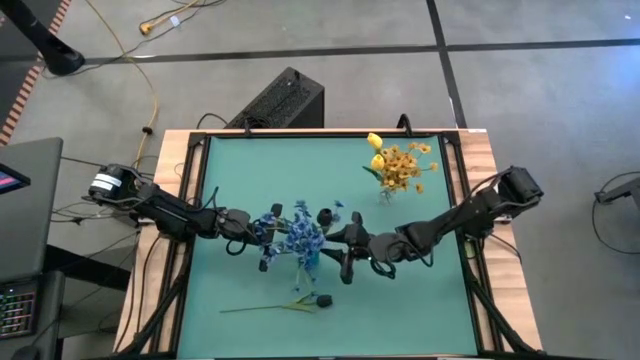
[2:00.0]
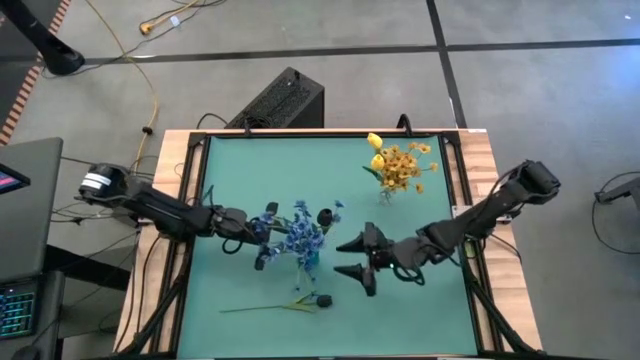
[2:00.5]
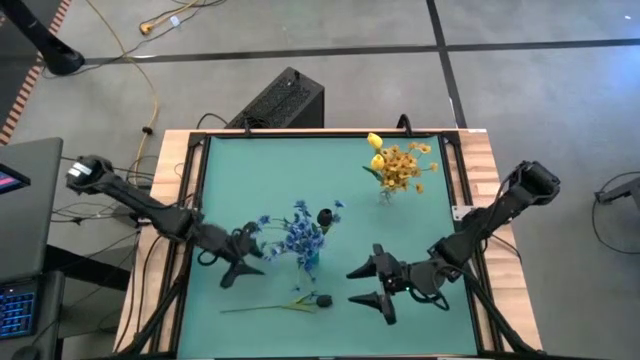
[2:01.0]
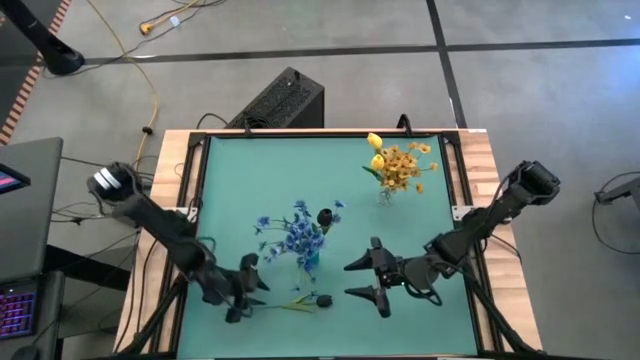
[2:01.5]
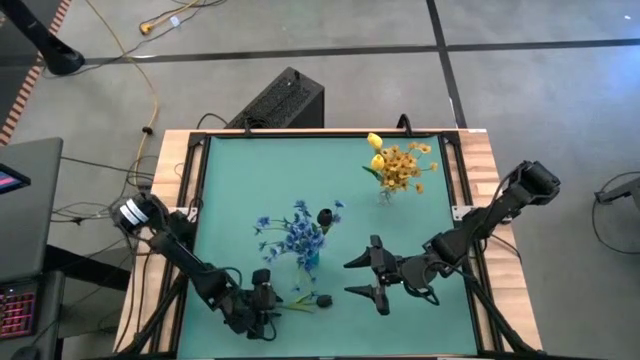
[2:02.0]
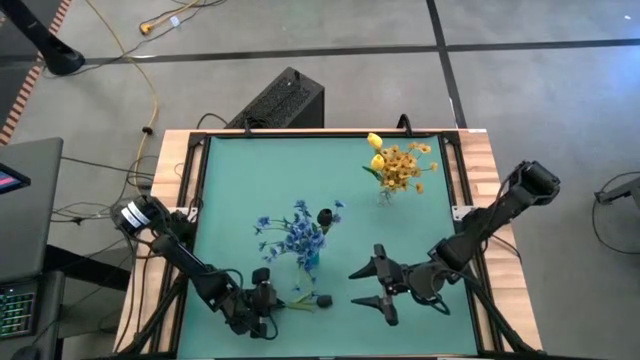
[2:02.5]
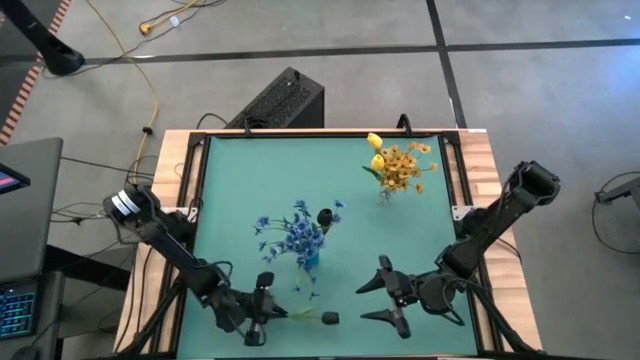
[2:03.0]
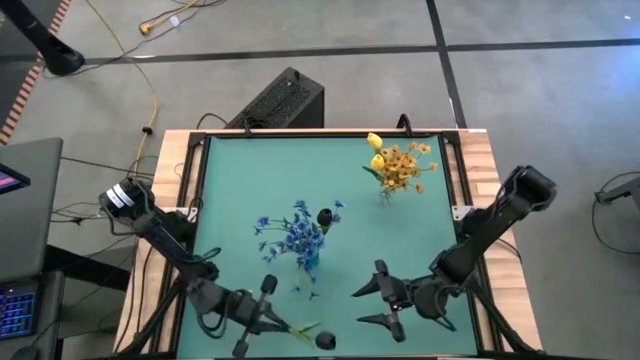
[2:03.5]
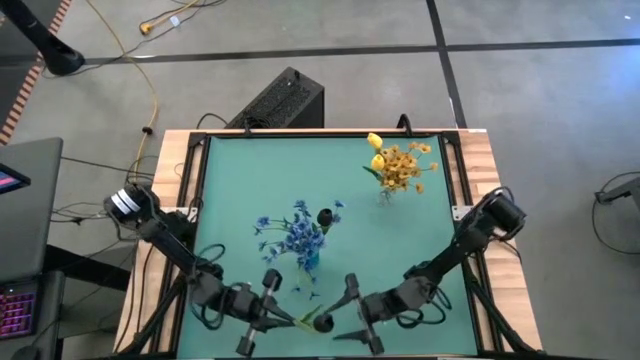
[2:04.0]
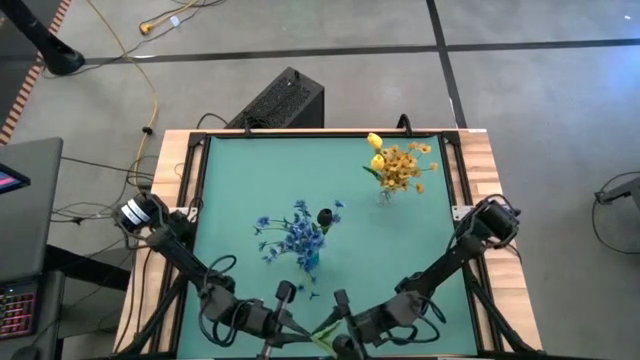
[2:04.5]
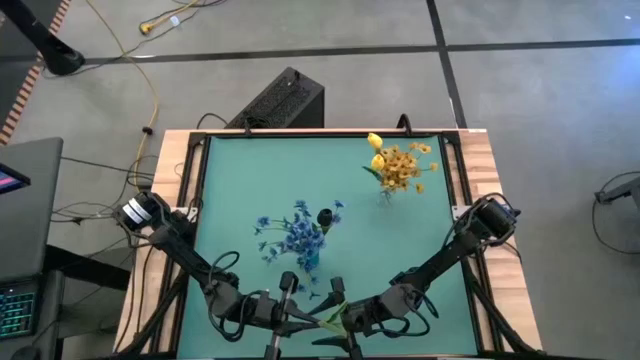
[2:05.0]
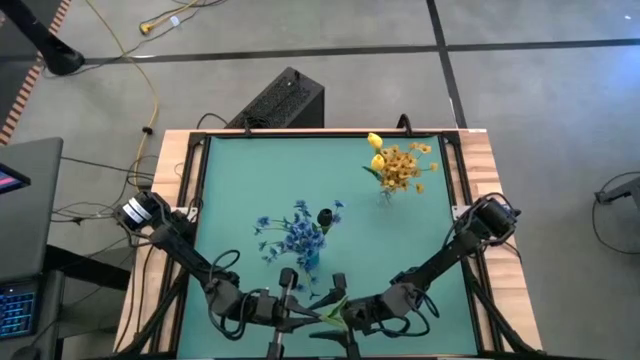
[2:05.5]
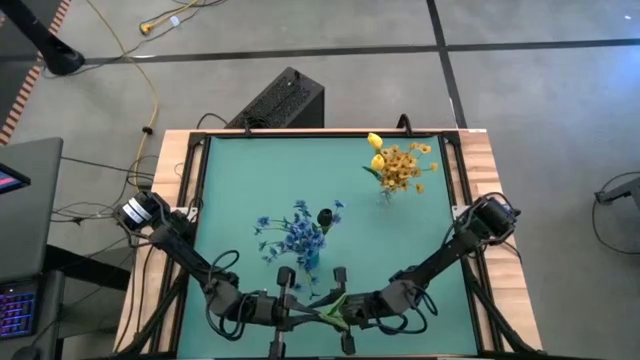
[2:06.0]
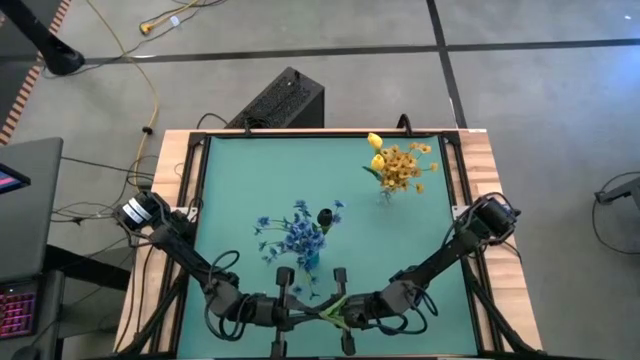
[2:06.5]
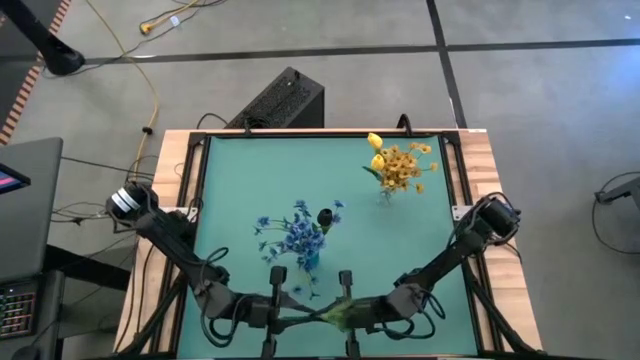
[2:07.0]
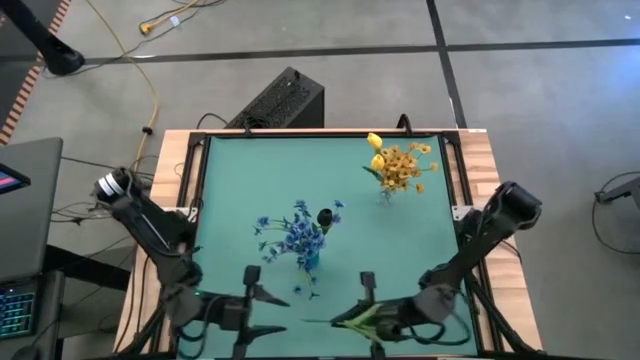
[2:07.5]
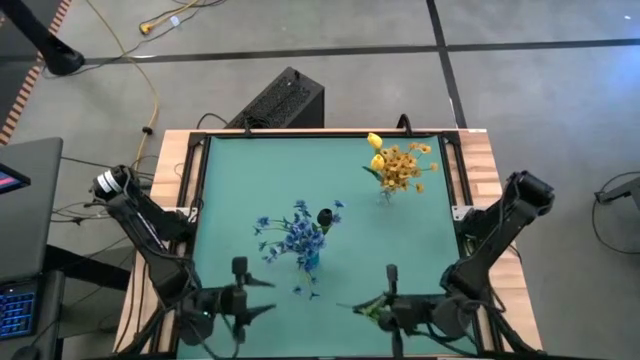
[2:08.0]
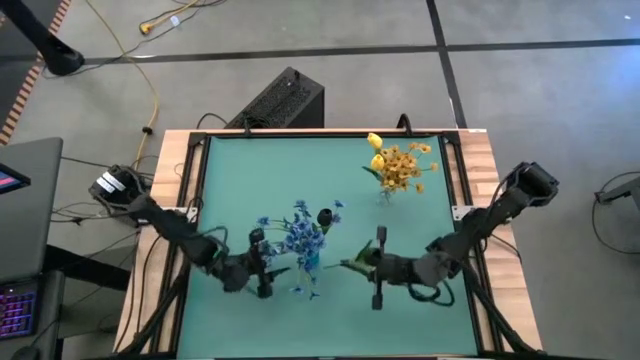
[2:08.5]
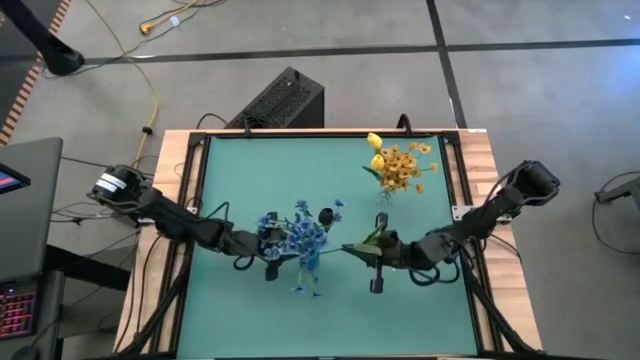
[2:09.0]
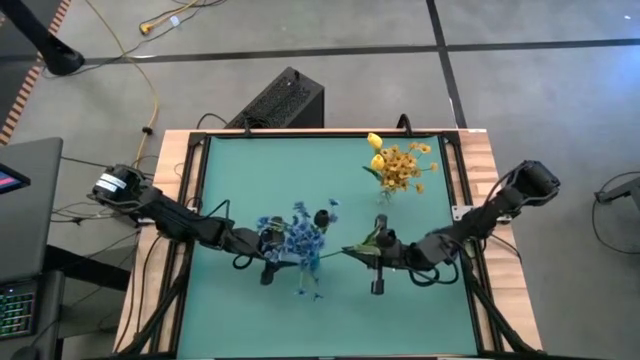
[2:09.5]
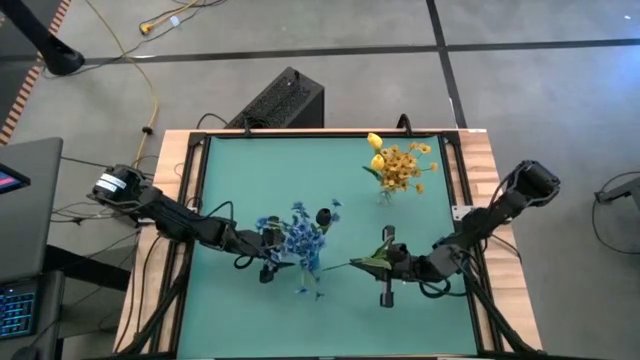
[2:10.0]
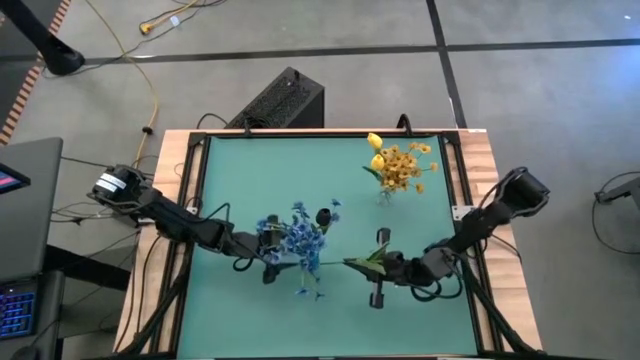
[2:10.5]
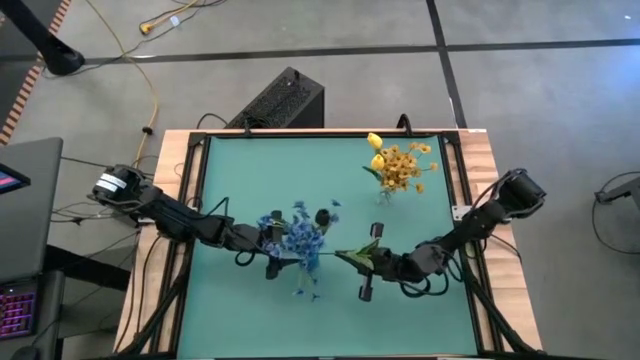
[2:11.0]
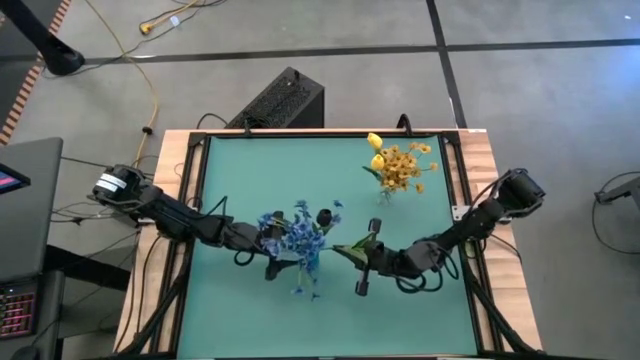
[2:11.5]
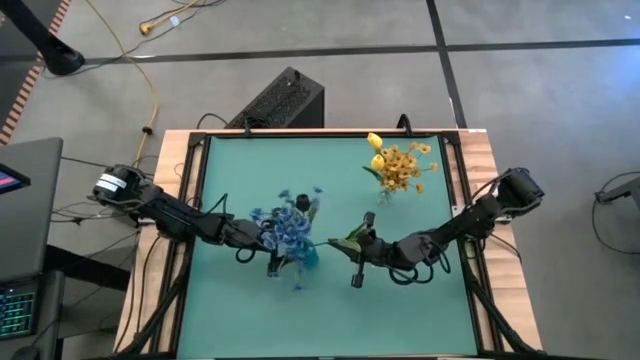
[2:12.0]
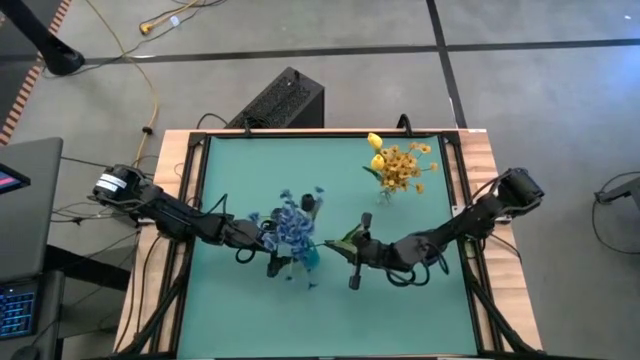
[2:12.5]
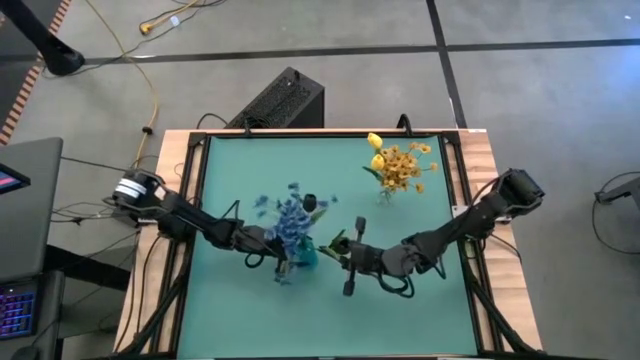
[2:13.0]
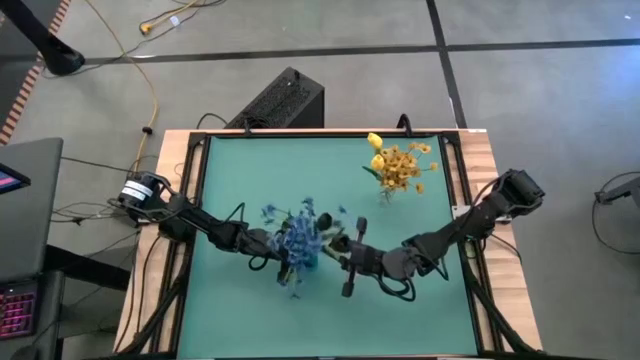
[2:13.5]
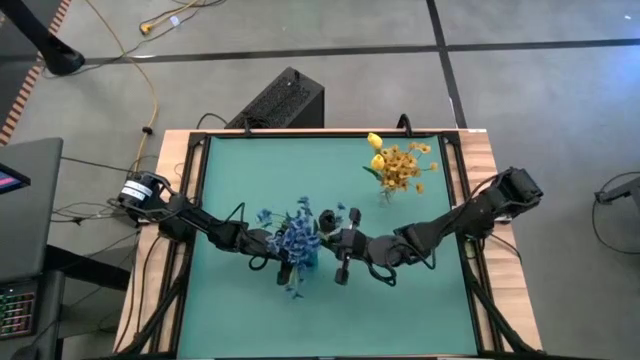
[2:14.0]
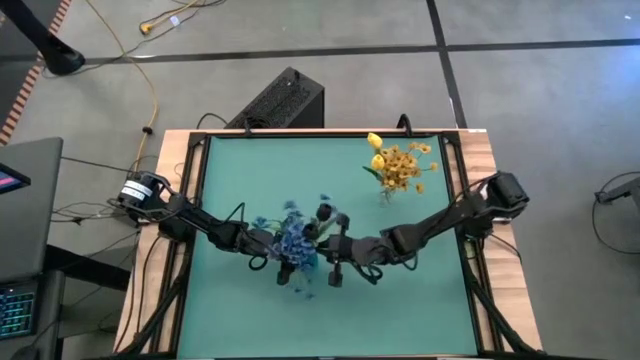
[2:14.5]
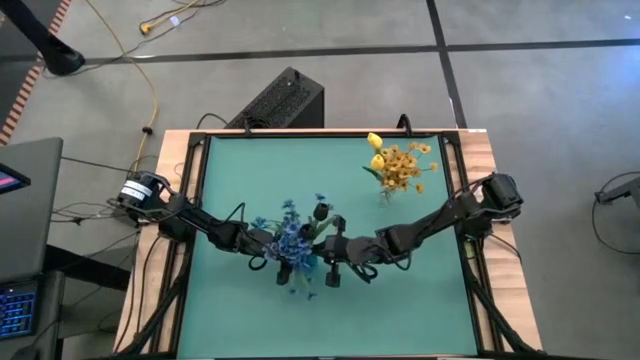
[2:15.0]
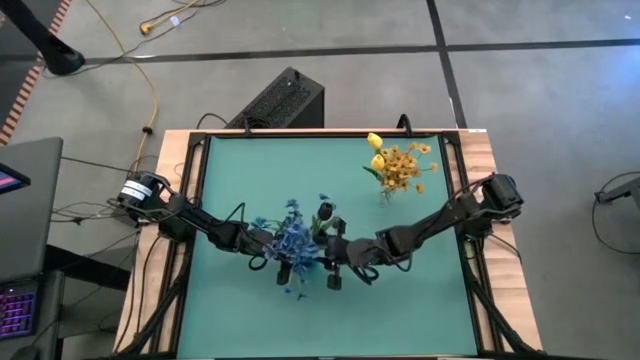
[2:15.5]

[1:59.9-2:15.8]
Task: Sort flowers into vase by color
Put the black tulip into the blue transparent vase

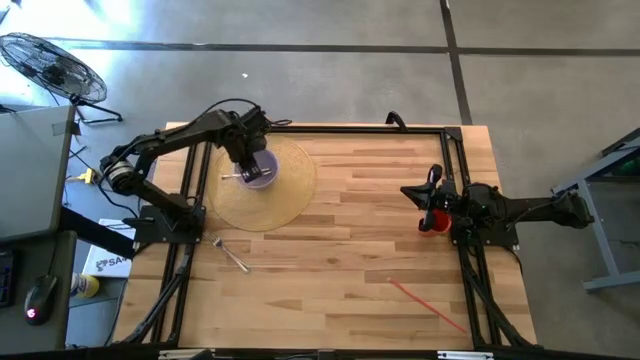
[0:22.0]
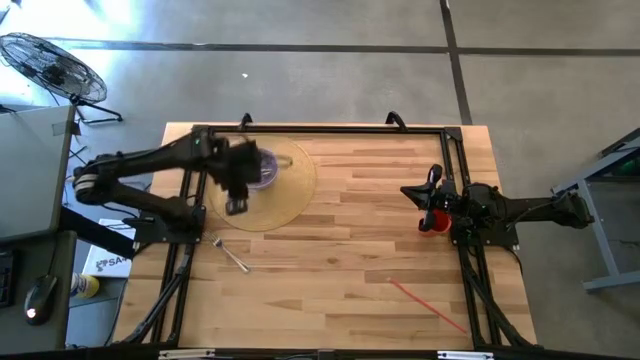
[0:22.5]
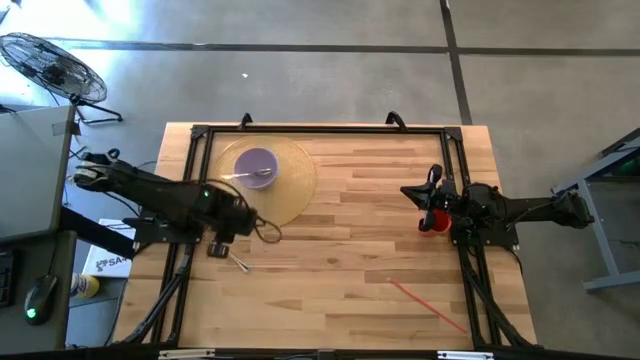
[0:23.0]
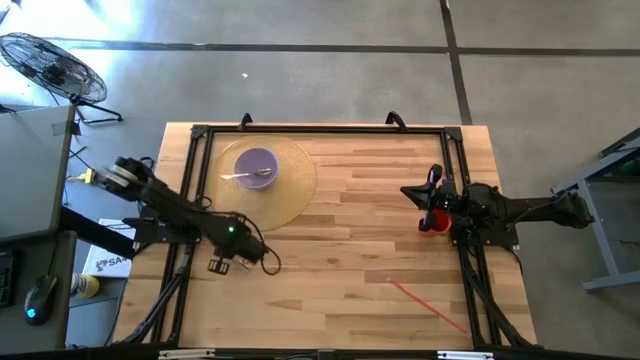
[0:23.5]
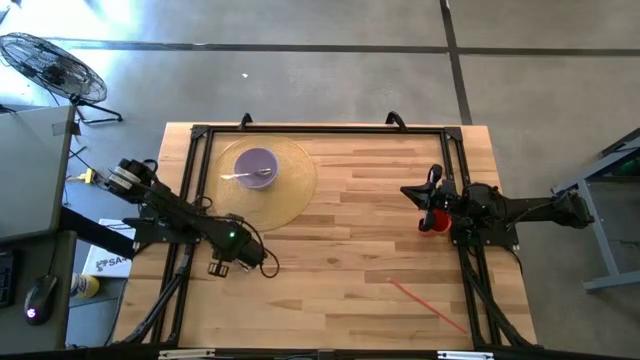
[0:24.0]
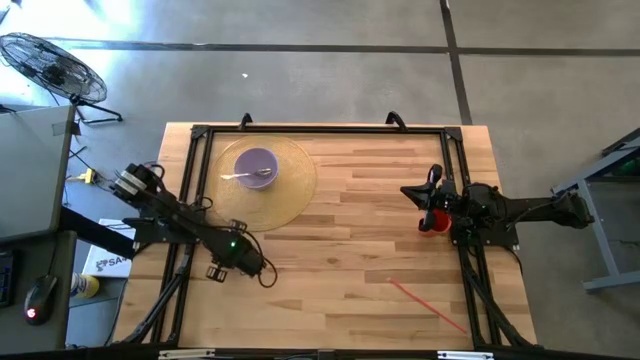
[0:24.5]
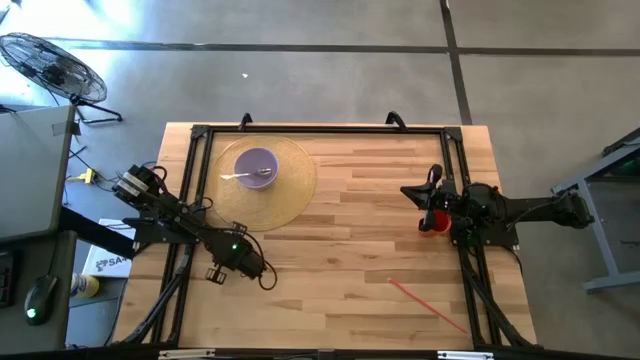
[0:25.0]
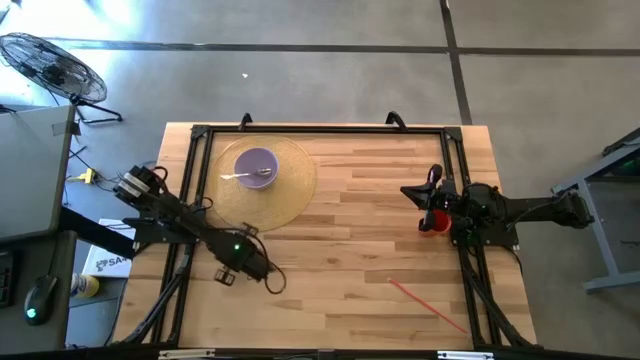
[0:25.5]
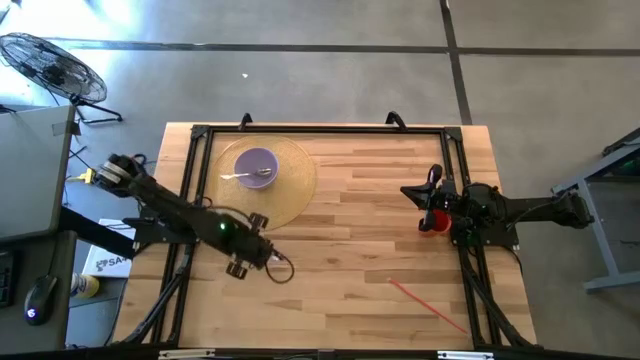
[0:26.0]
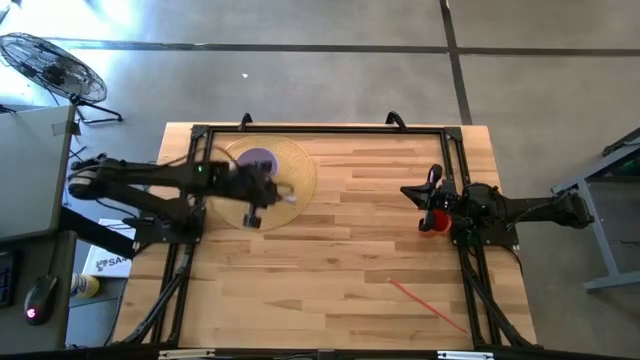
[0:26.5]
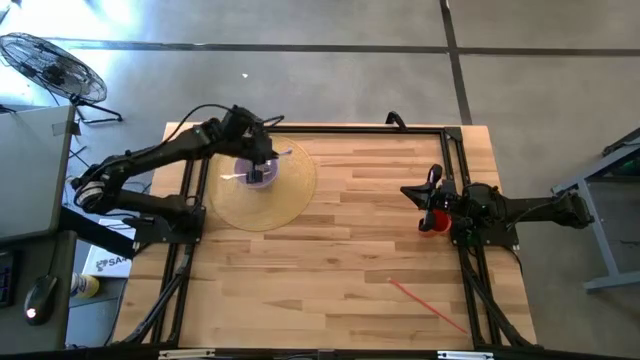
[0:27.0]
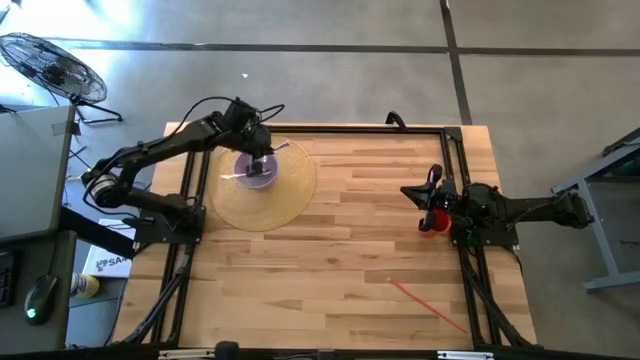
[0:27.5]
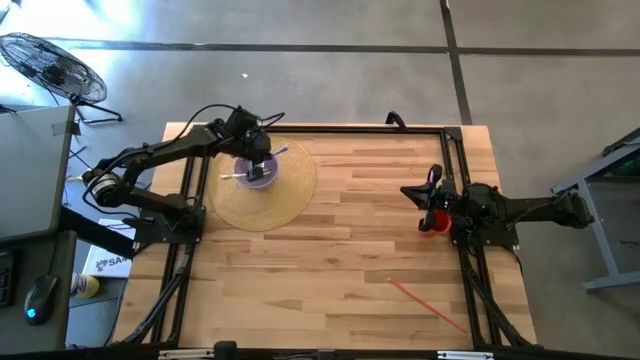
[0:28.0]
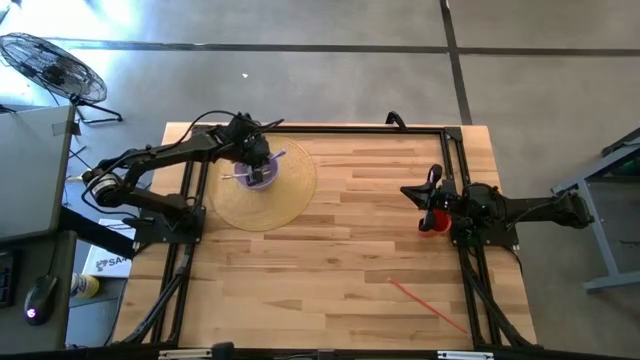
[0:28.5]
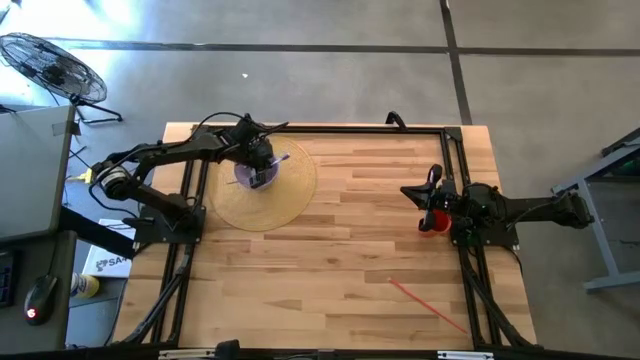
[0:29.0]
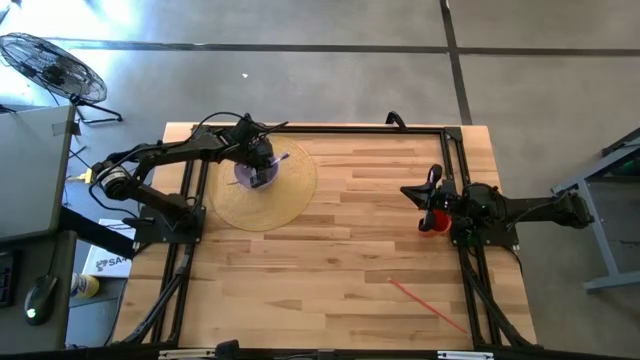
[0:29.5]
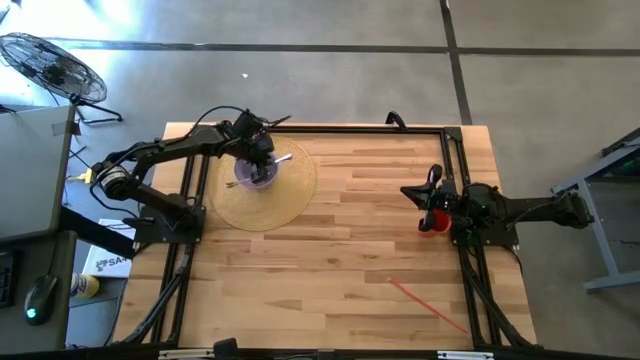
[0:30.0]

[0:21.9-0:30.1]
Task: Pick & Place Utensil
Put the silver fork into the purple bowl
